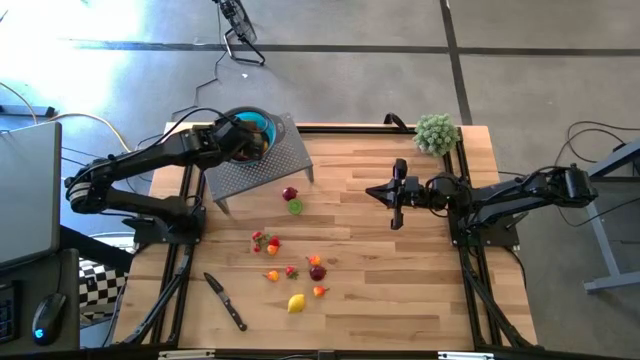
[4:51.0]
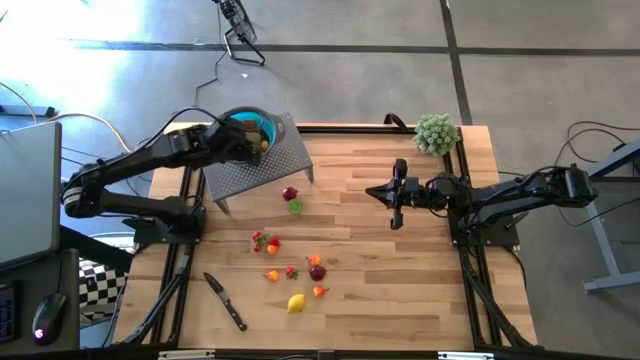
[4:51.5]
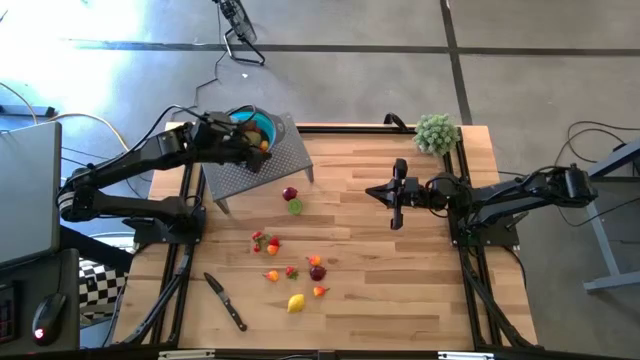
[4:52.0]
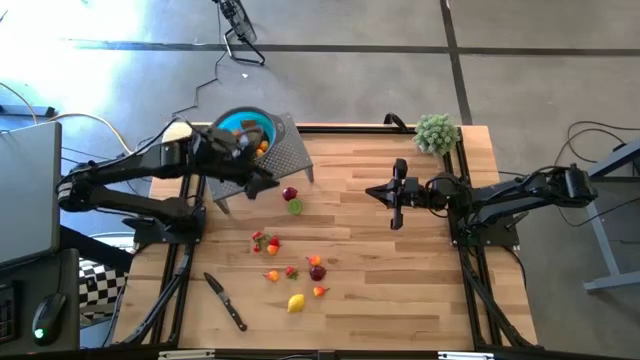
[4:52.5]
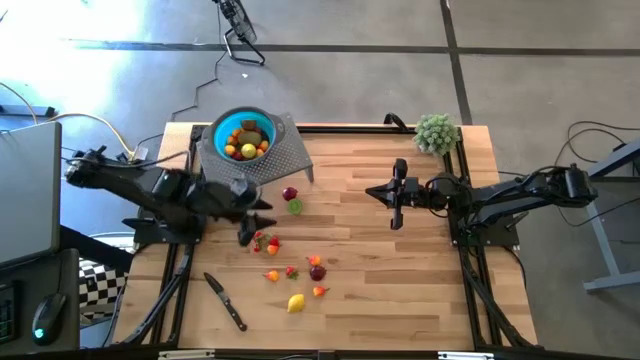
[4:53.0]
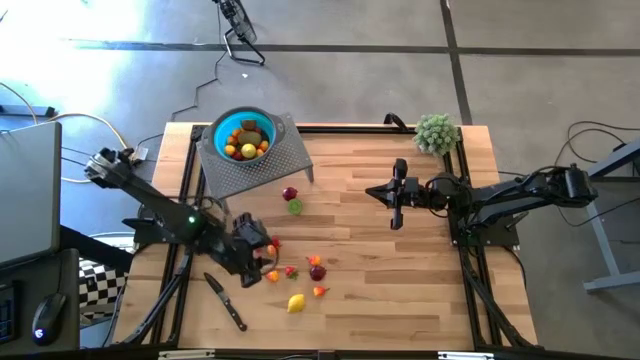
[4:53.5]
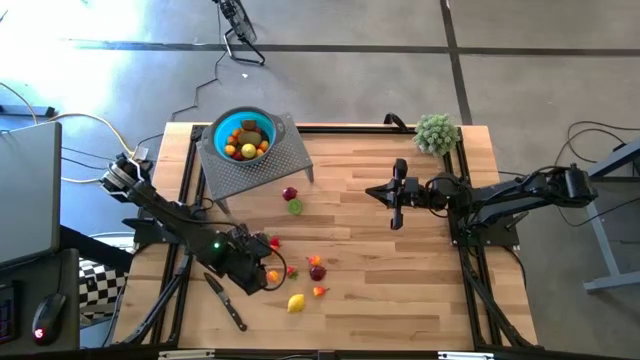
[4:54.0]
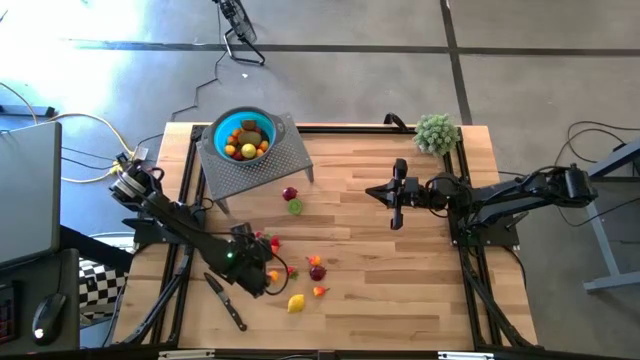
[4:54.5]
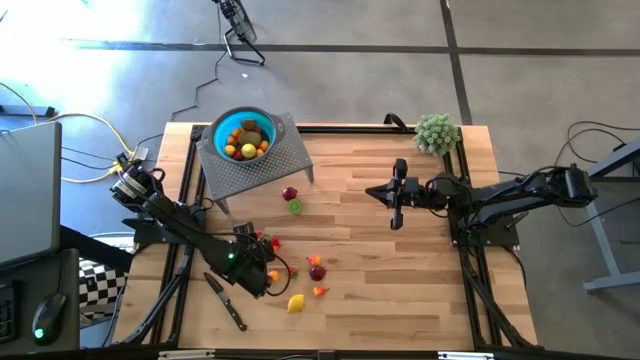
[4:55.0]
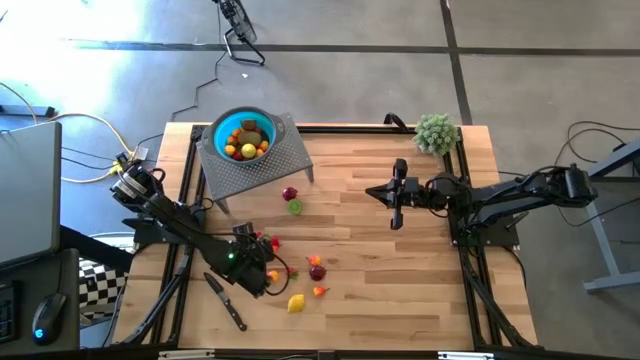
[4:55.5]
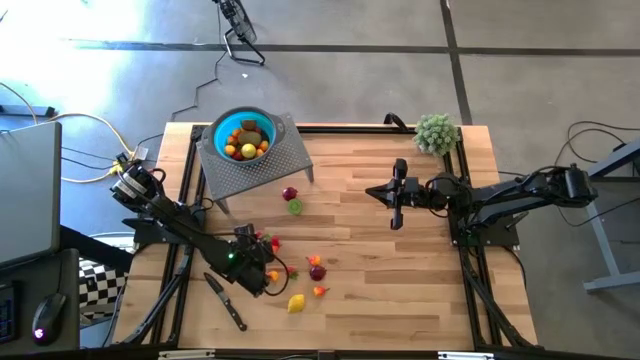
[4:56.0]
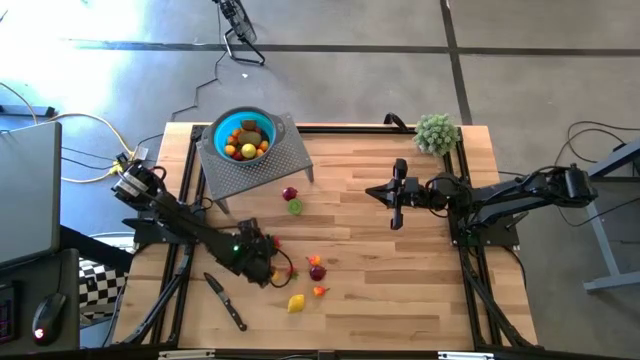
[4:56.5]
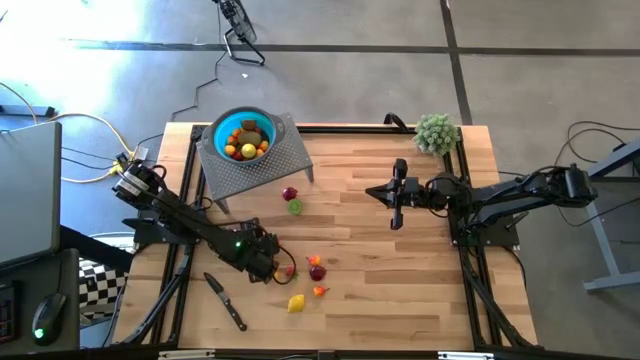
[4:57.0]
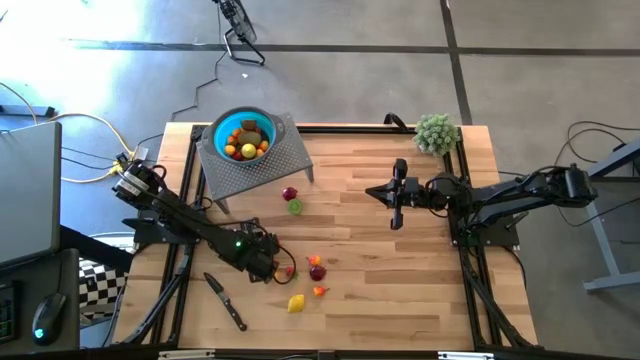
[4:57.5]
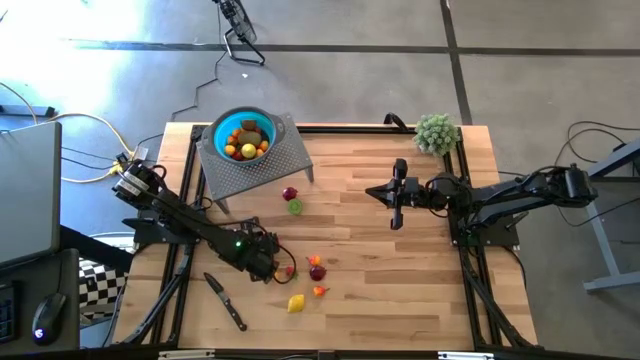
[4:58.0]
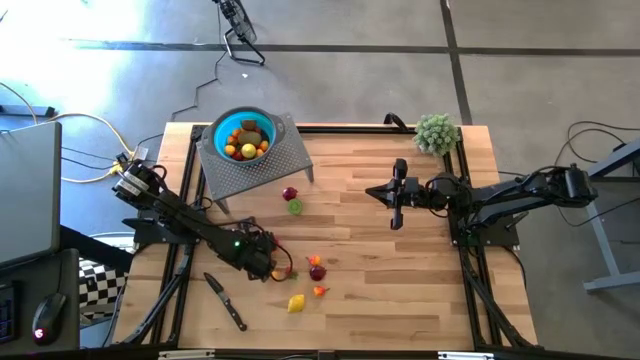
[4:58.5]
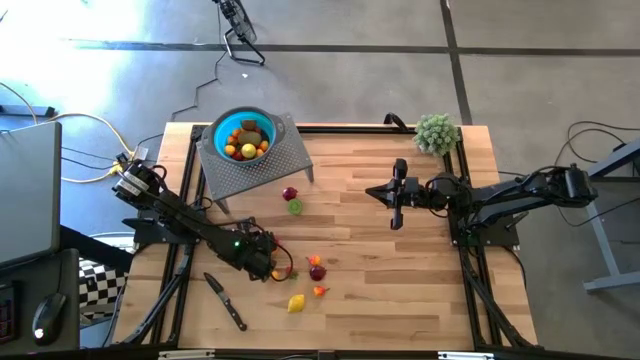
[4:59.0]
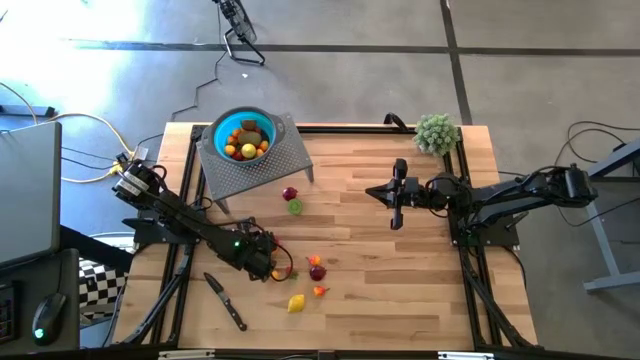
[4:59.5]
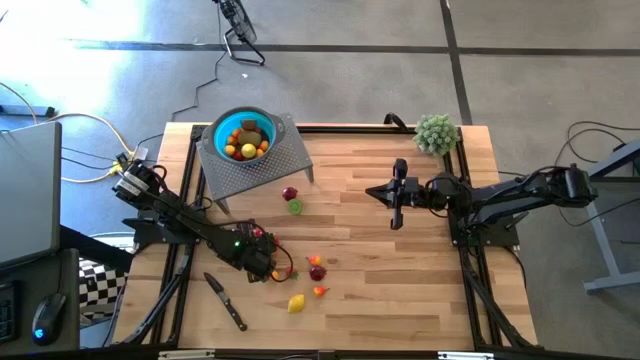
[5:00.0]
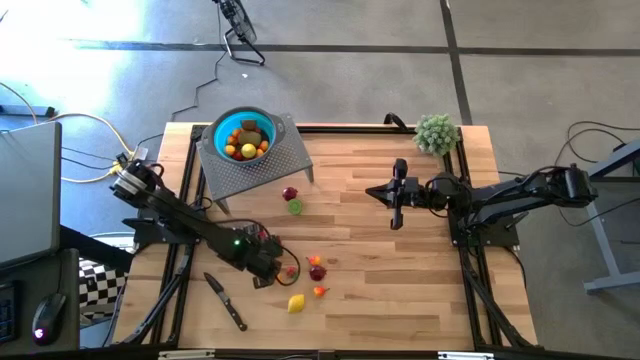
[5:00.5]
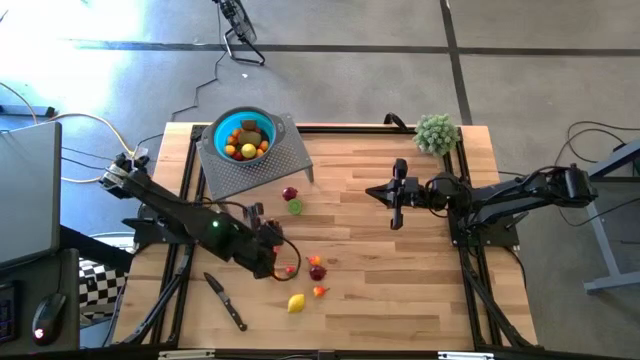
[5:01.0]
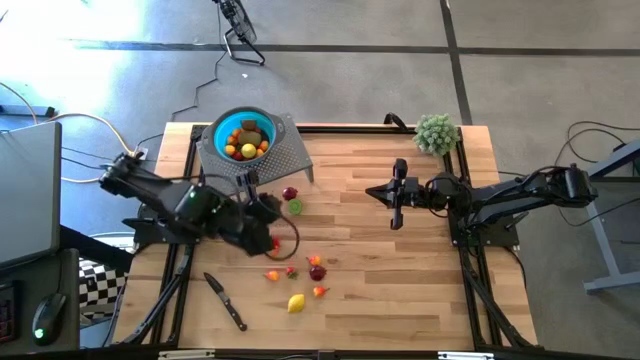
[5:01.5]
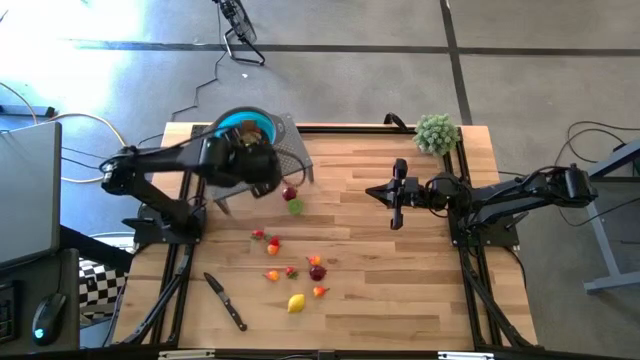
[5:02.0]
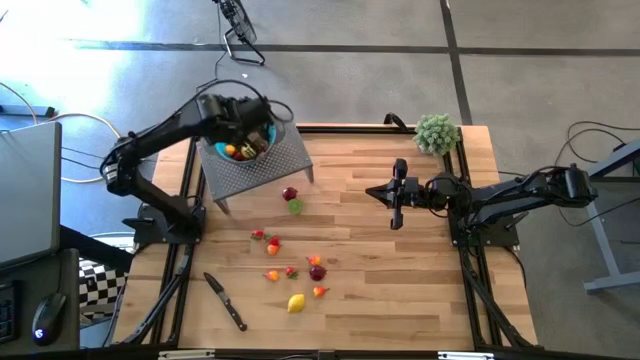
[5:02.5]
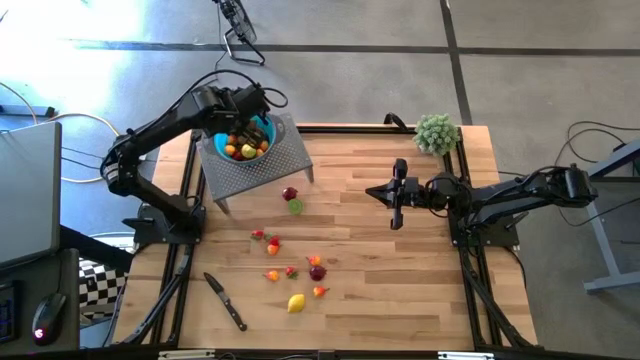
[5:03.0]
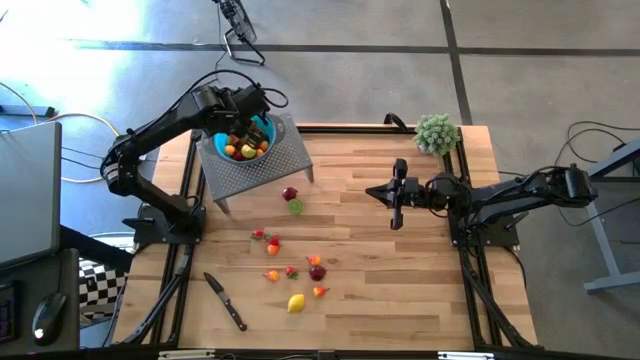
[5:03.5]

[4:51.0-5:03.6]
Task: Pick & Place Fruit
Put the red strawberry into the blue strainer bowl on the shelf

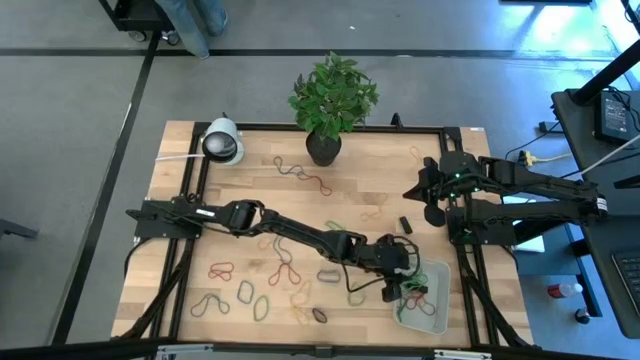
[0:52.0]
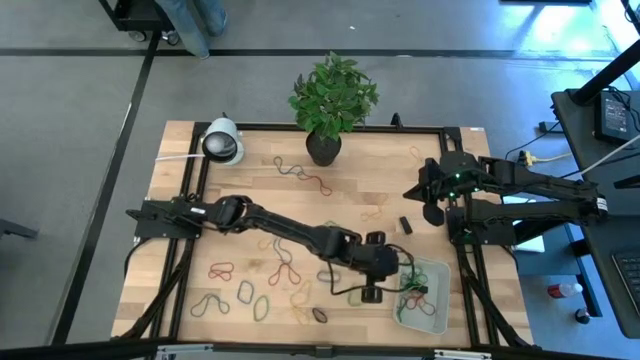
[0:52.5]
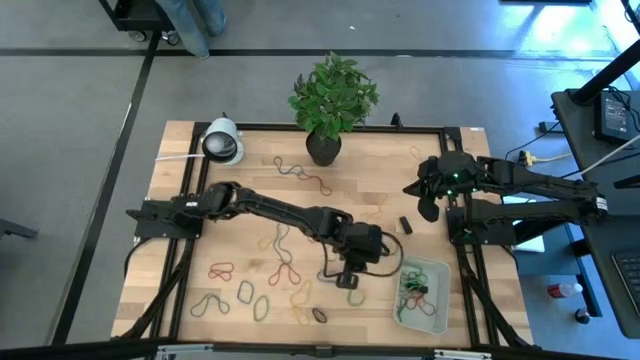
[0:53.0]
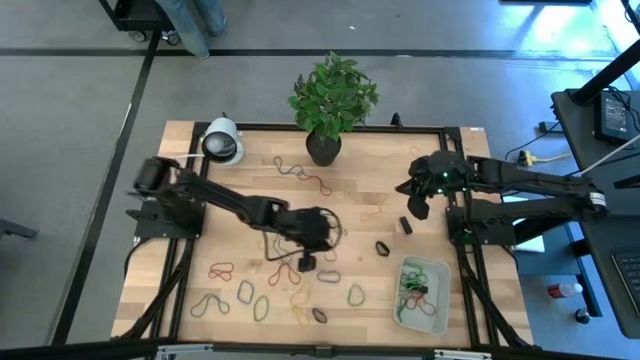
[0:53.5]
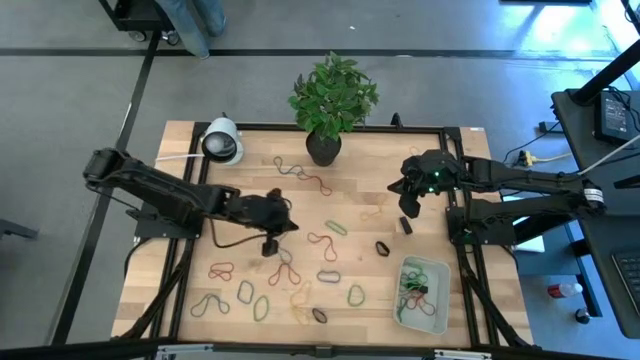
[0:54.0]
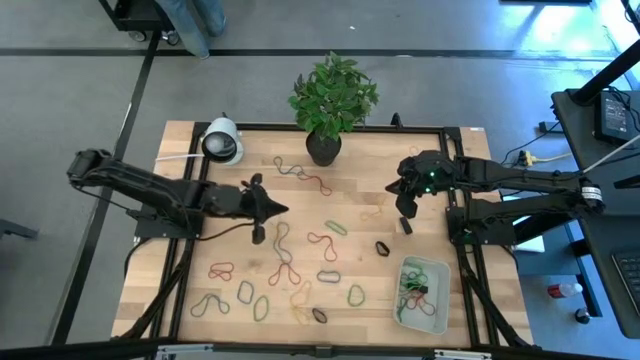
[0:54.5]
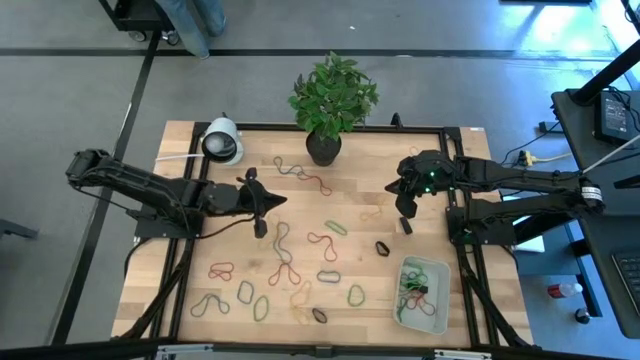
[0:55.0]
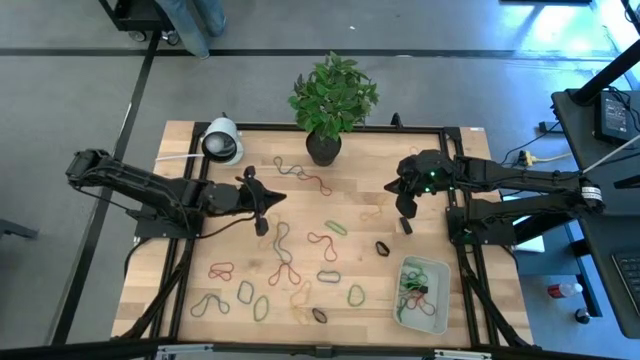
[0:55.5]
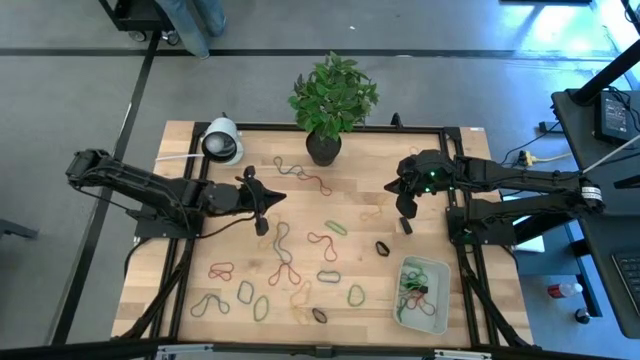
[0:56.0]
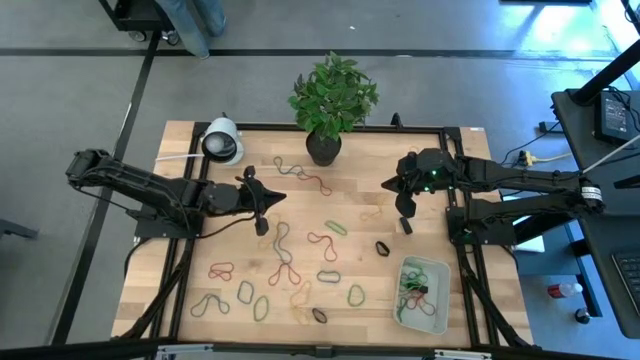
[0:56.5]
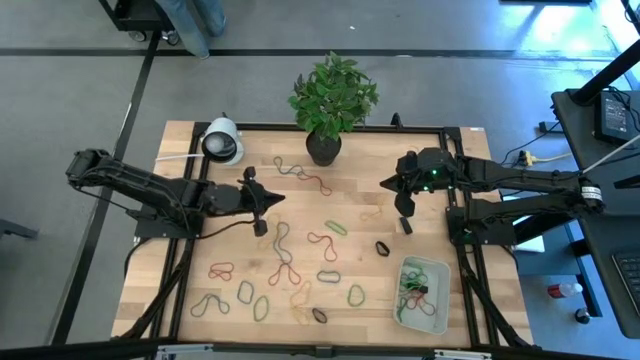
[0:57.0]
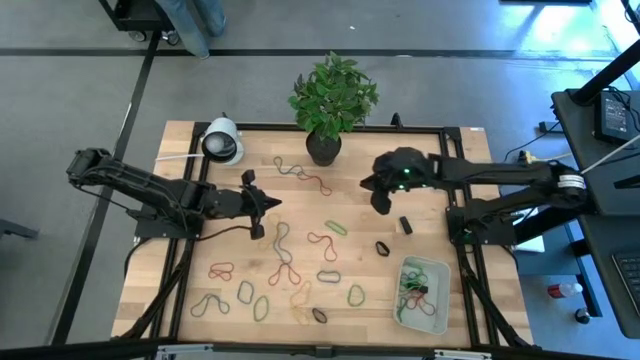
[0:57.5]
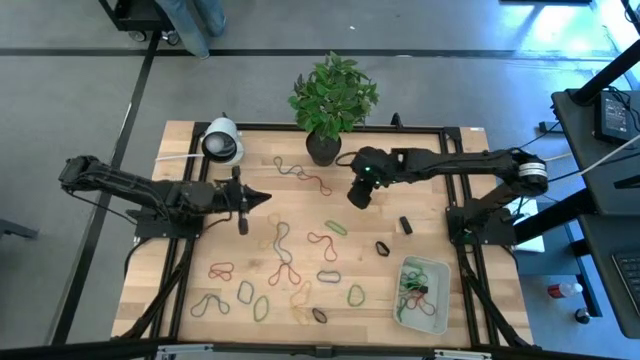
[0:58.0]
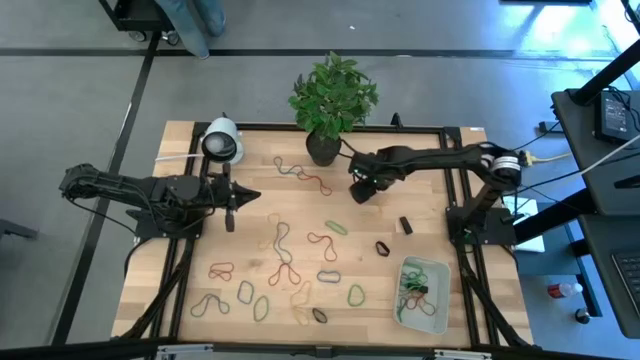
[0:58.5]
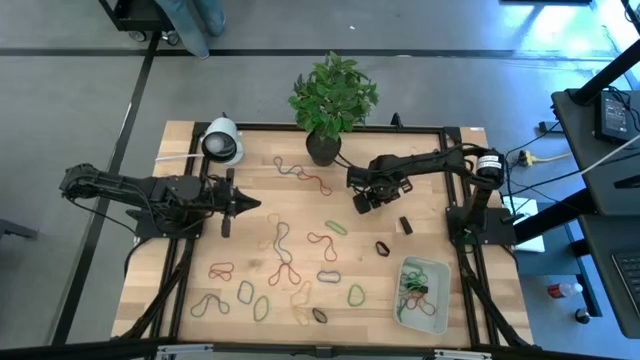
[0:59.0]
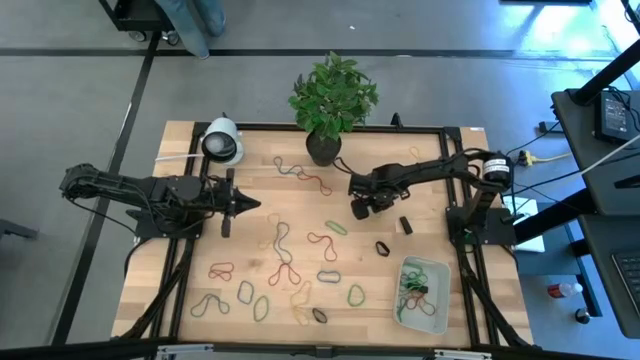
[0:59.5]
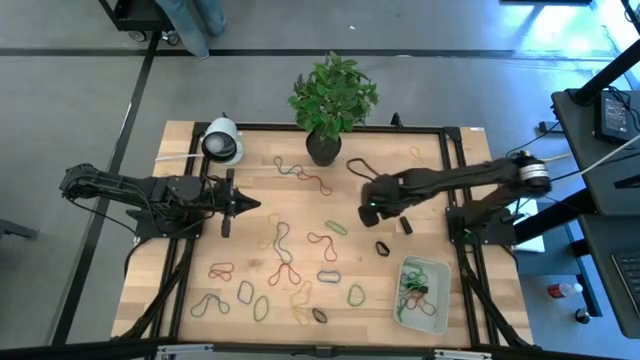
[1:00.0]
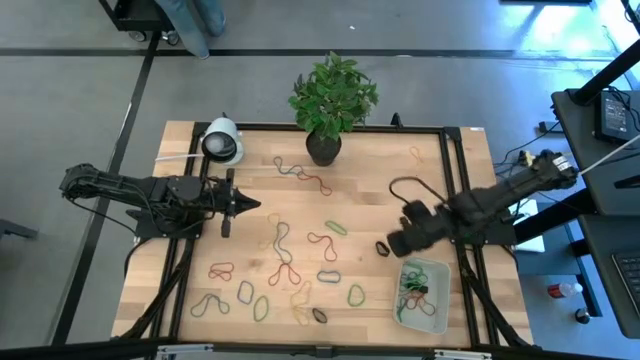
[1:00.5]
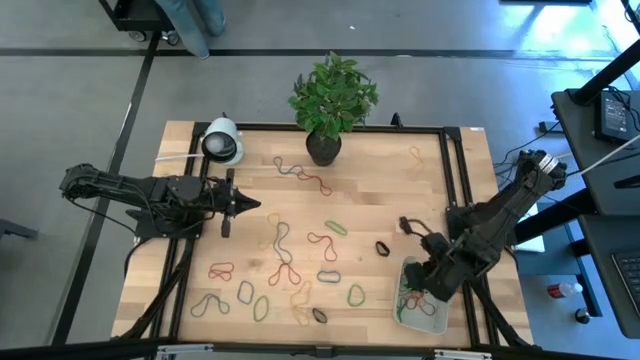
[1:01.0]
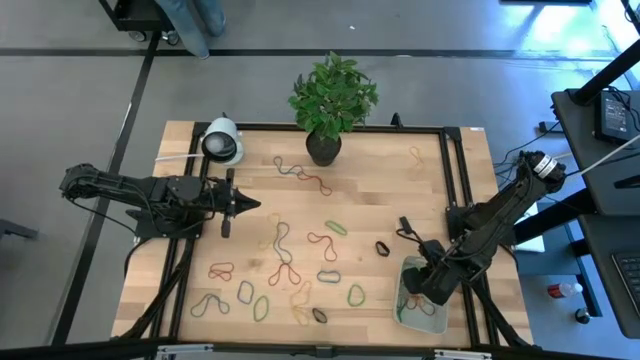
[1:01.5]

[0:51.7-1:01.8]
Task: Pick and place rubber bands into bin
Put the yellow rubber band into the gray bin
